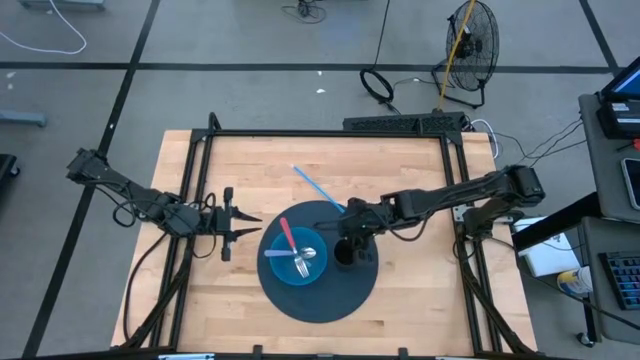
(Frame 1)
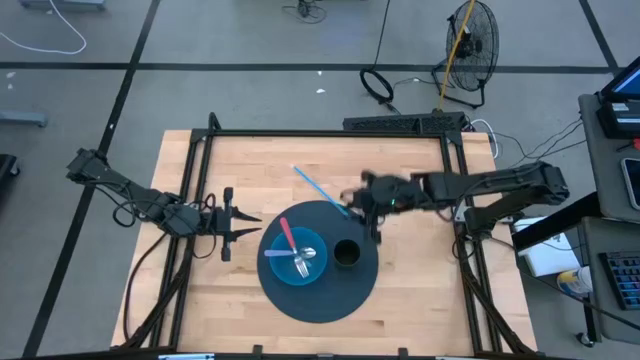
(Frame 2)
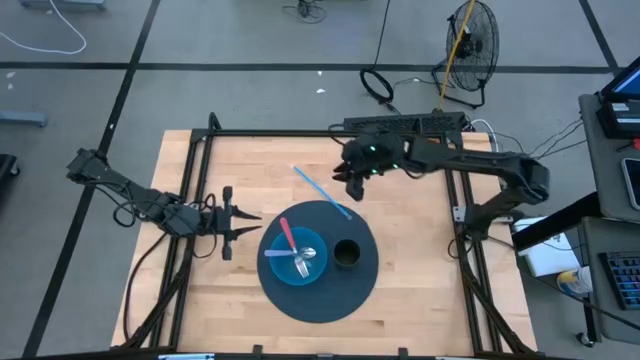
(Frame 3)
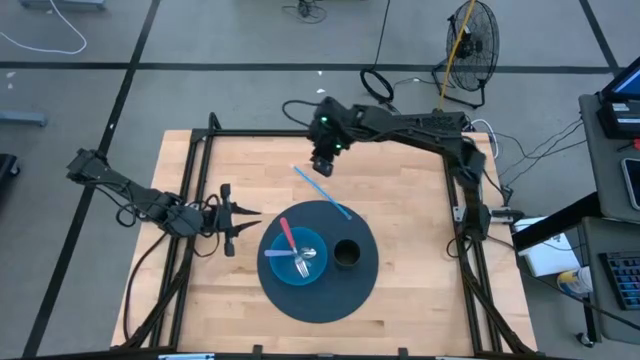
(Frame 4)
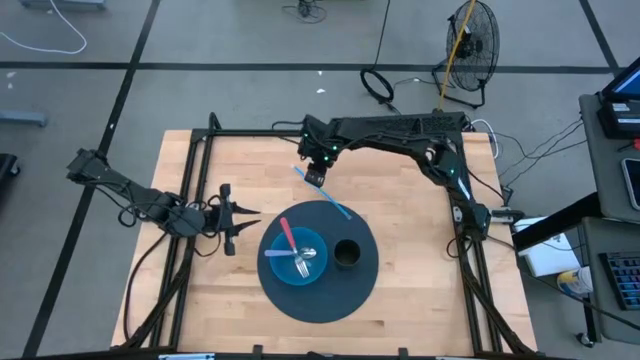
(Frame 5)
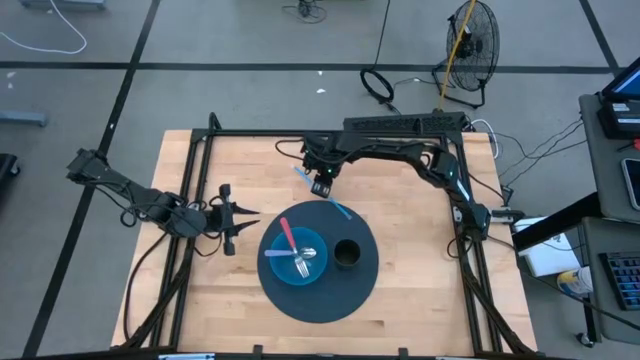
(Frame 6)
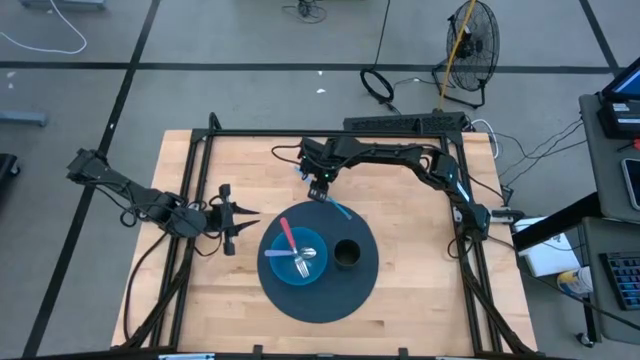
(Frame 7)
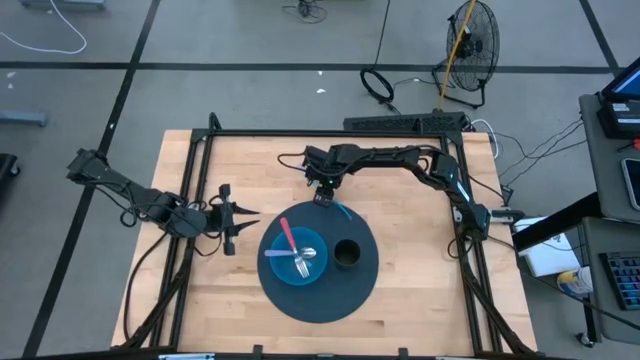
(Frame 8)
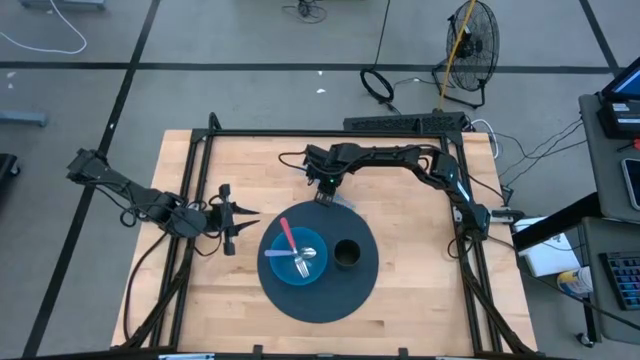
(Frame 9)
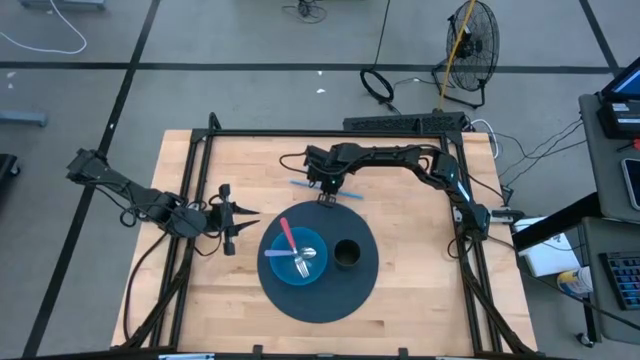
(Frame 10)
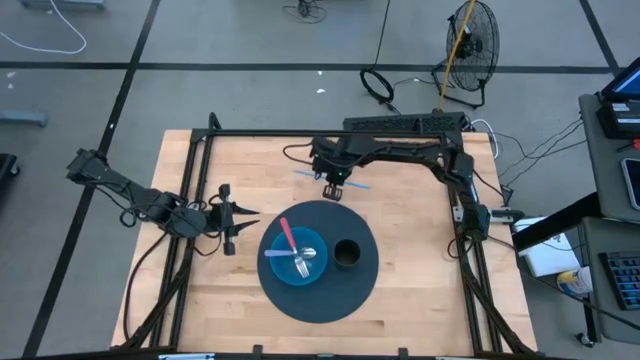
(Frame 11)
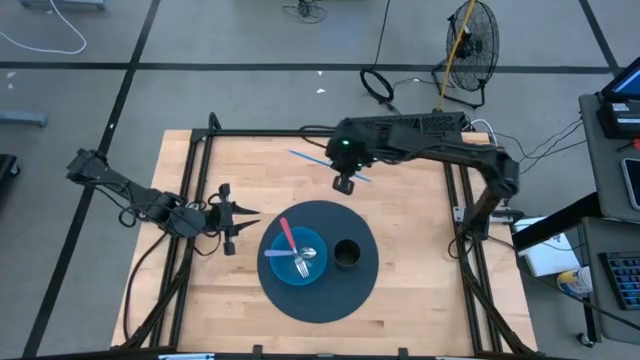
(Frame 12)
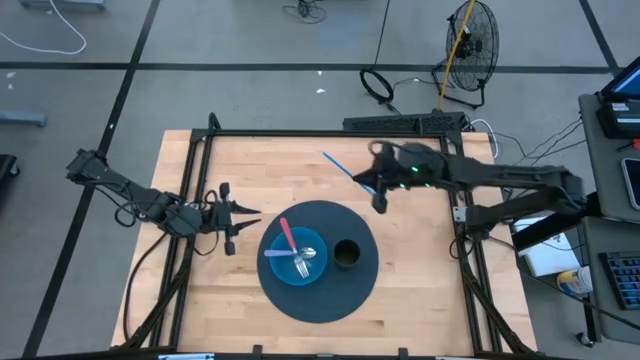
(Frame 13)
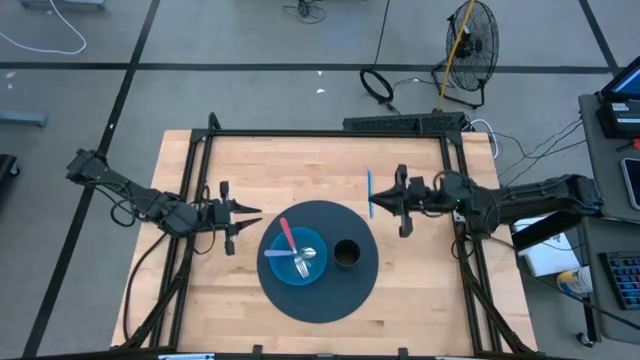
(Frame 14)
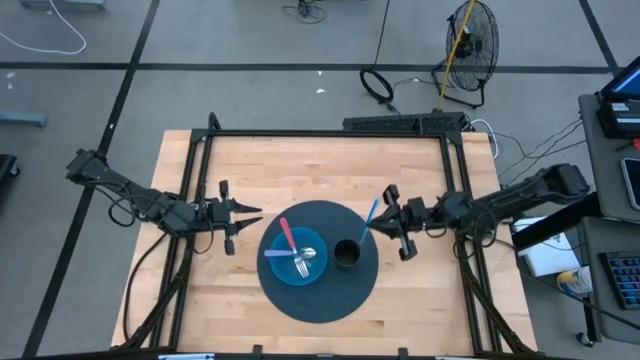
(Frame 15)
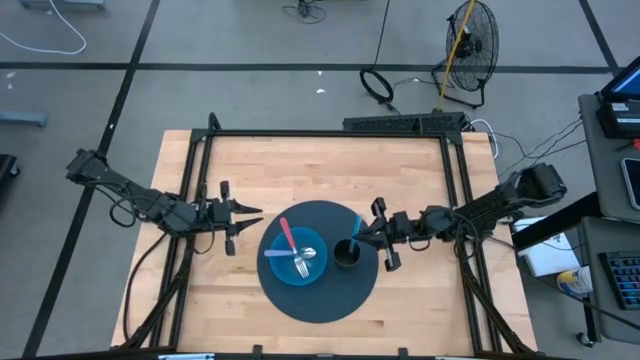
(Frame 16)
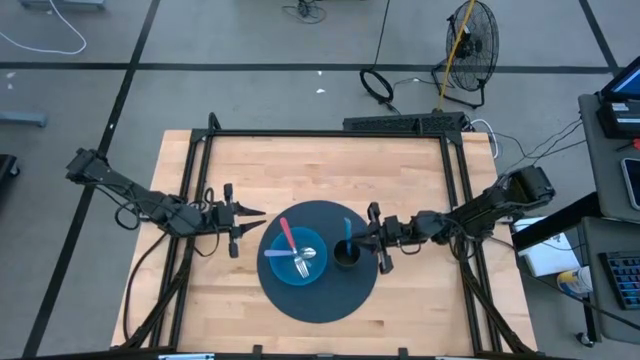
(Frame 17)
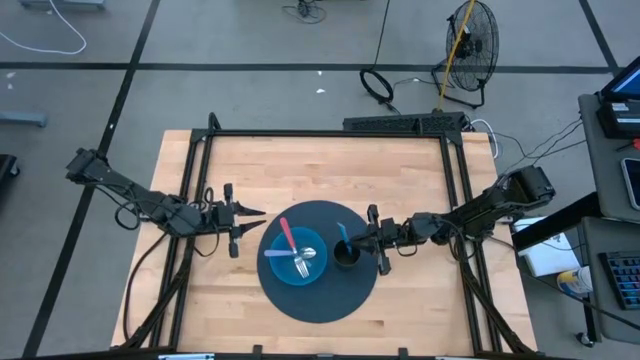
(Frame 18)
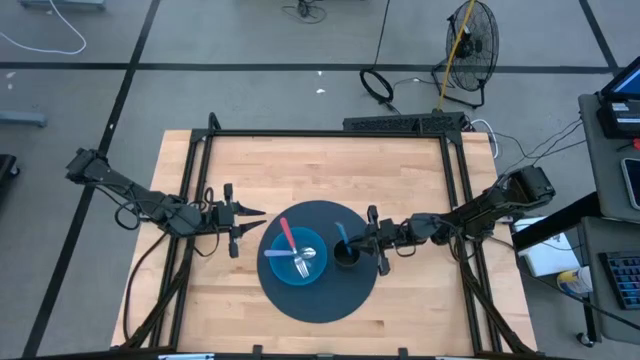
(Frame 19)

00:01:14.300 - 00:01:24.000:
Task: Pick & Place Utensil
Put the blue straw into the black cup on the blue mat

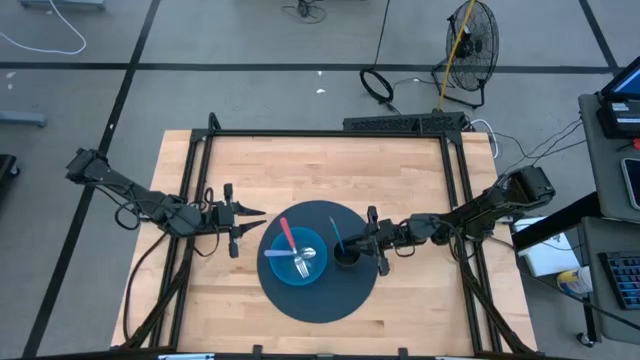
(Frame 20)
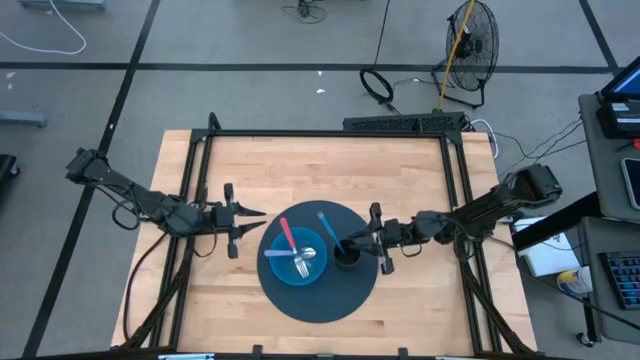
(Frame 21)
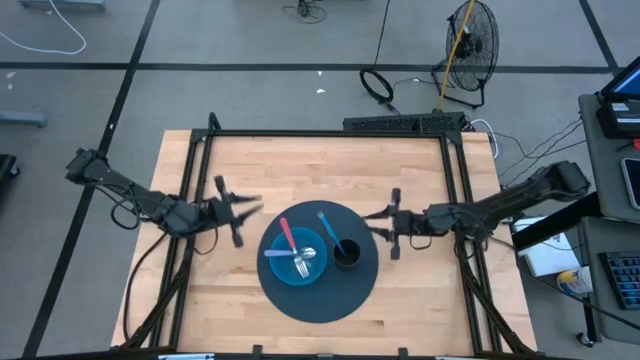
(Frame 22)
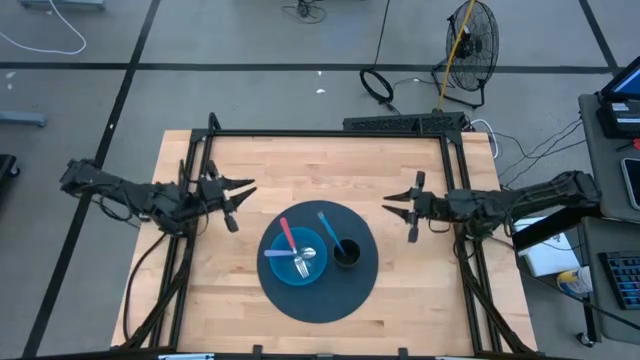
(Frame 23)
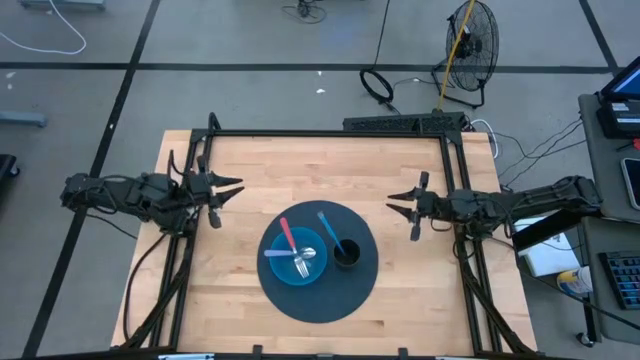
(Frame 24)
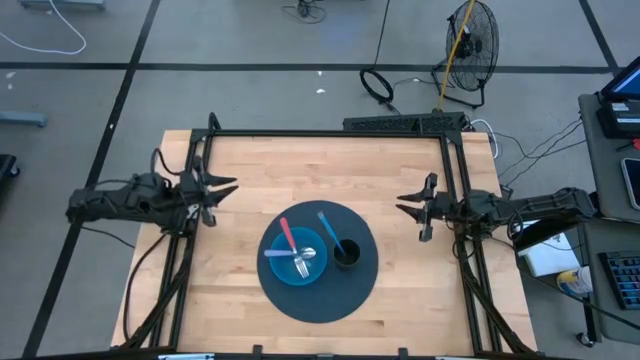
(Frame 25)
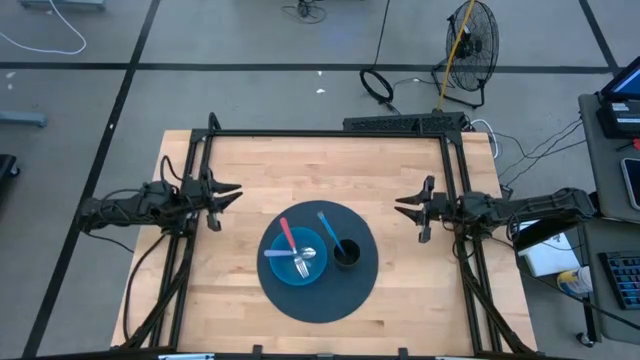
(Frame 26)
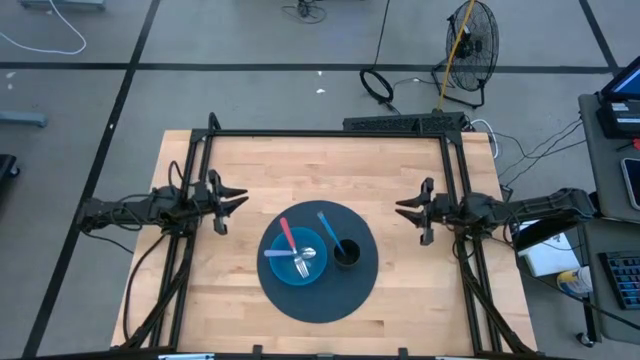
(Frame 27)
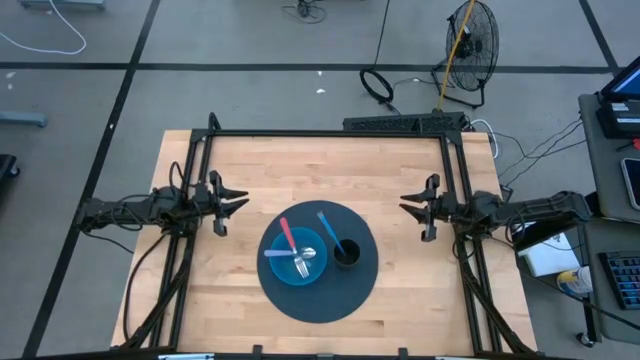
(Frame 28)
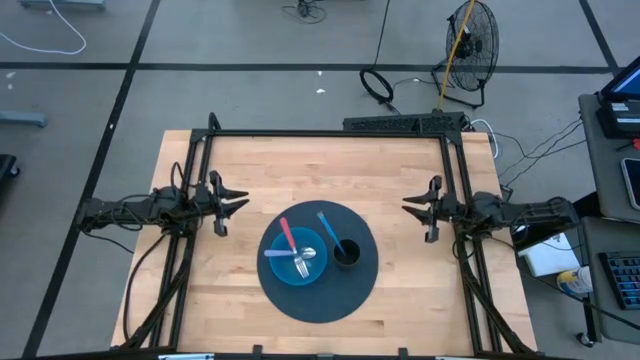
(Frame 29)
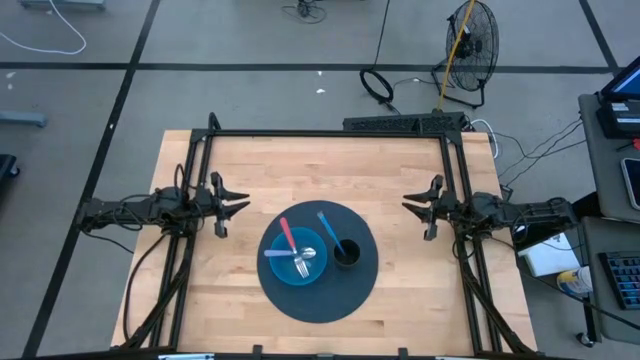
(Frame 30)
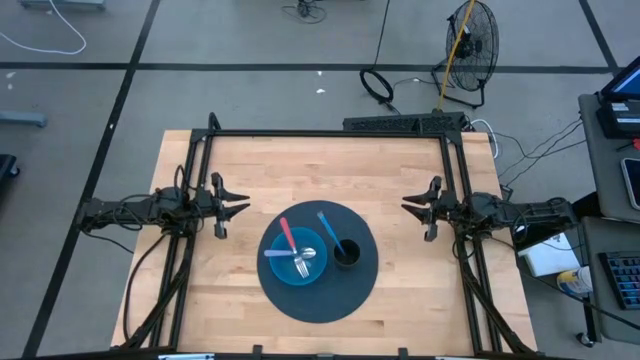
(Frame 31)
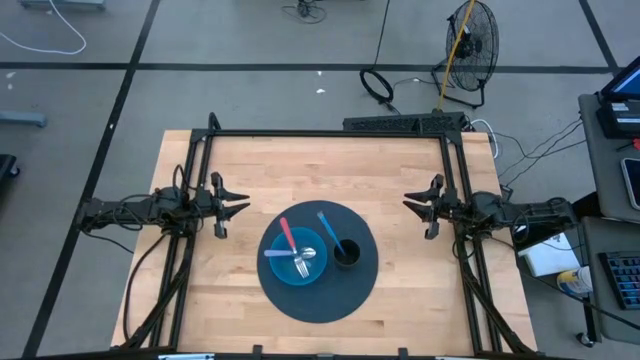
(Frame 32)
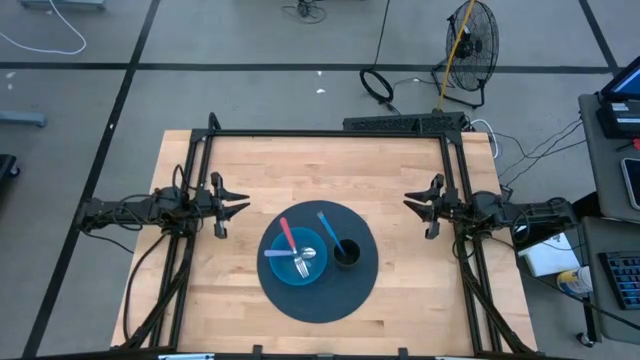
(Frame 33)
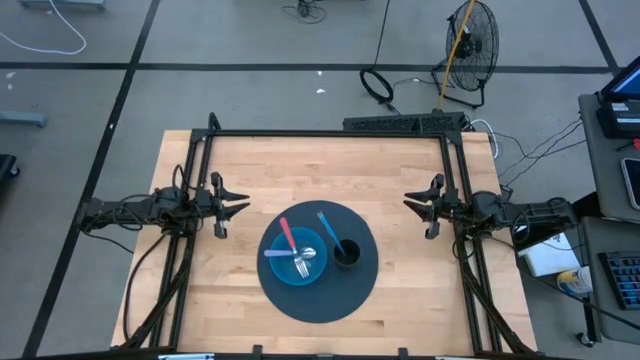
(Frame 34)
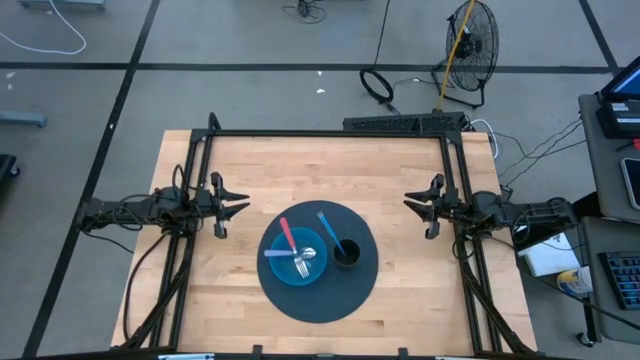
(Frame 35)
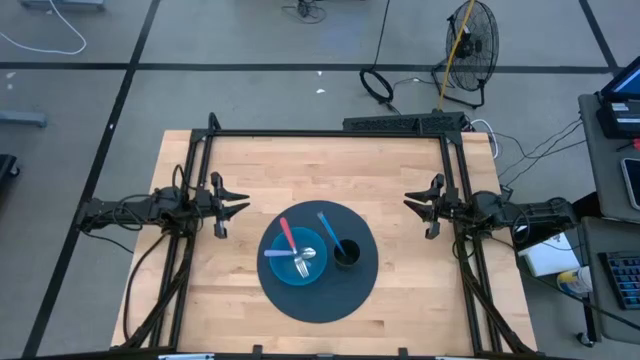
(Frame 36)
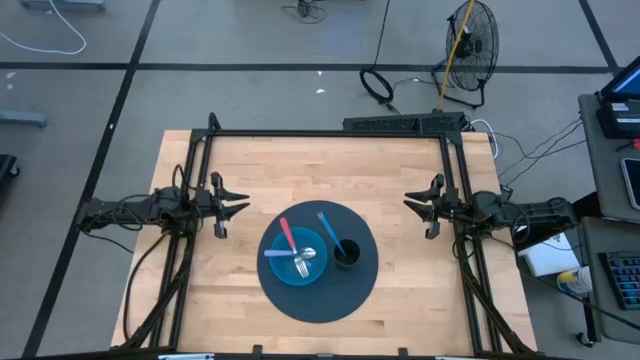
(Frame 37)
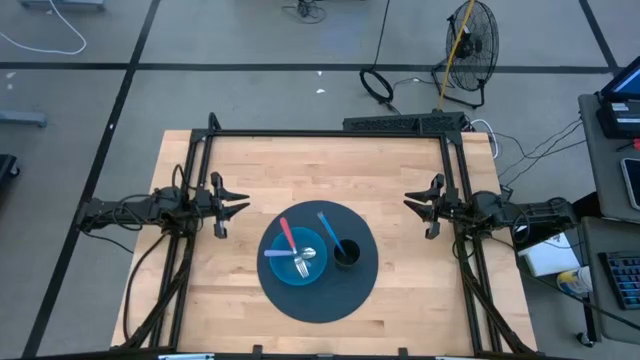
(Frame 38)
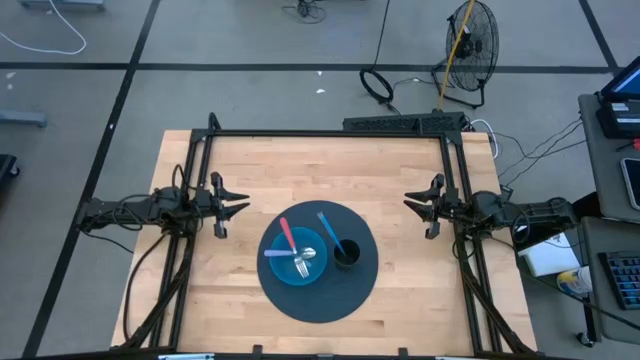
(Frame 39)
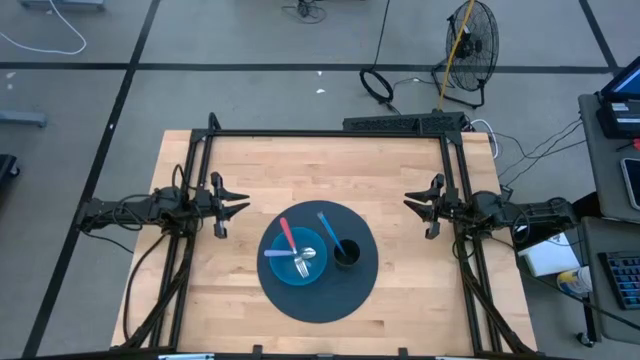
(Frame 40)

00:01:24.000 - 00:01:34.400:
Return to Home Position
